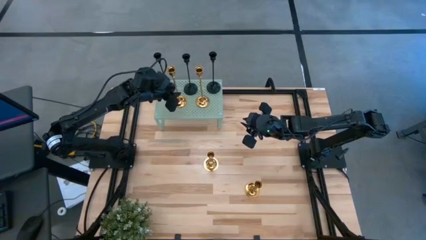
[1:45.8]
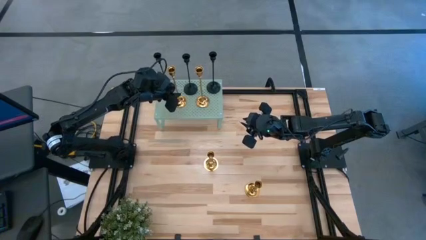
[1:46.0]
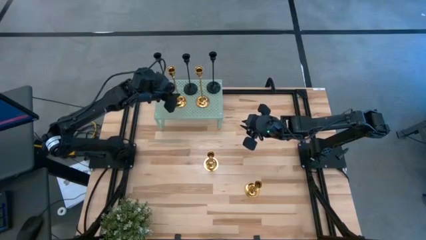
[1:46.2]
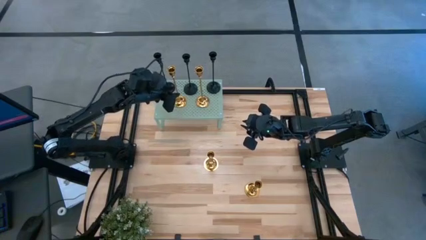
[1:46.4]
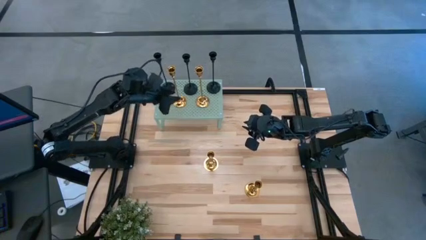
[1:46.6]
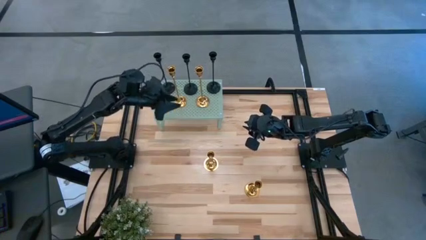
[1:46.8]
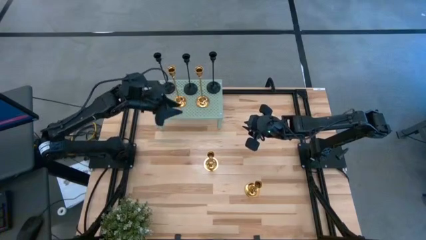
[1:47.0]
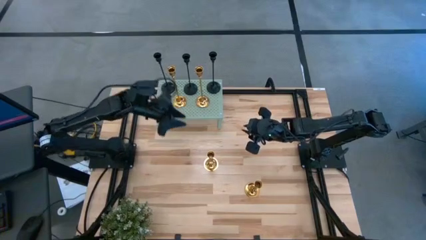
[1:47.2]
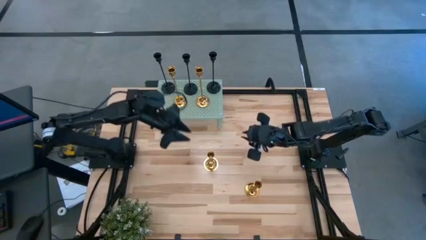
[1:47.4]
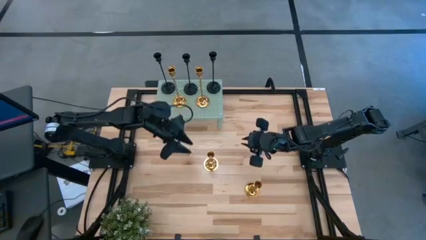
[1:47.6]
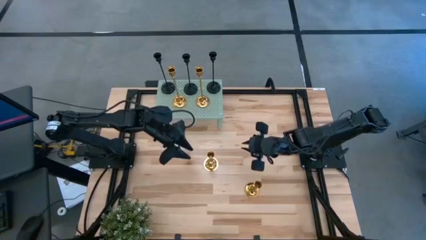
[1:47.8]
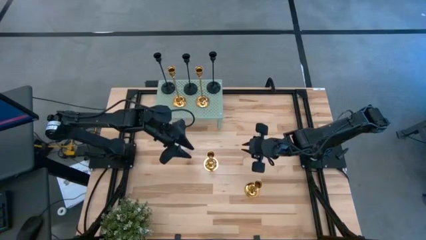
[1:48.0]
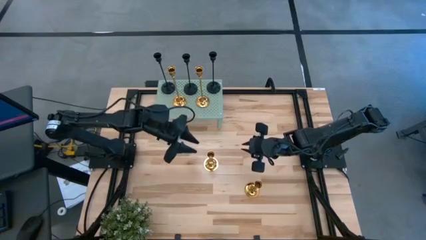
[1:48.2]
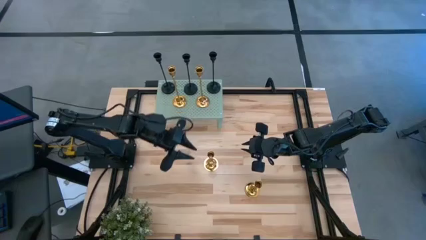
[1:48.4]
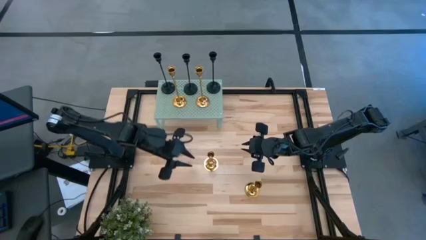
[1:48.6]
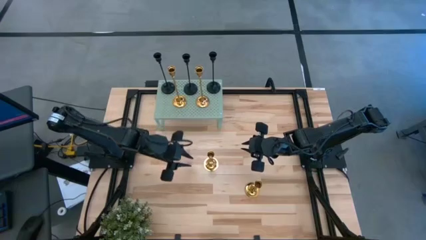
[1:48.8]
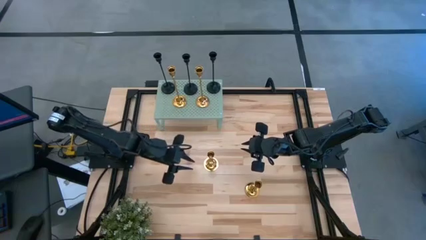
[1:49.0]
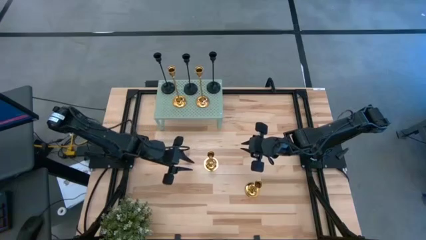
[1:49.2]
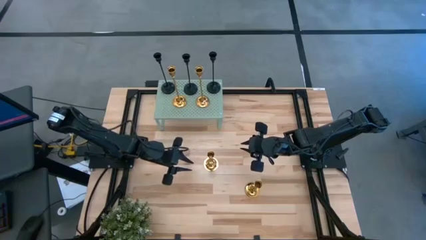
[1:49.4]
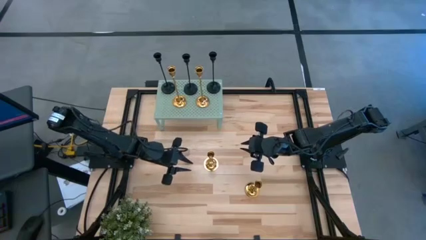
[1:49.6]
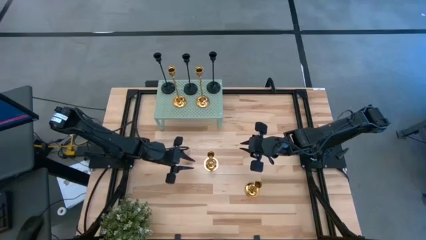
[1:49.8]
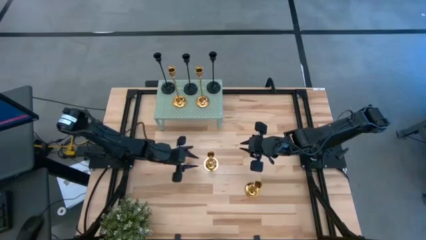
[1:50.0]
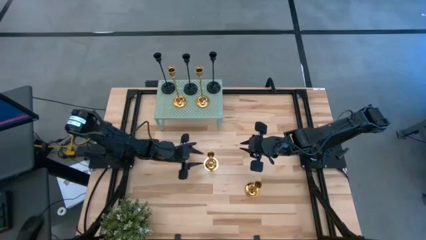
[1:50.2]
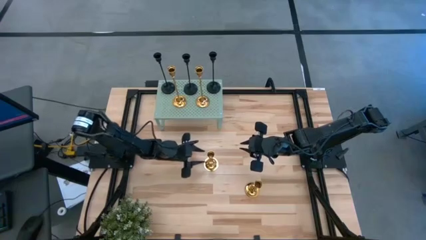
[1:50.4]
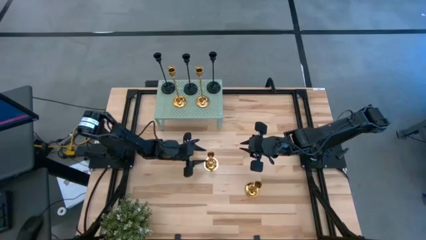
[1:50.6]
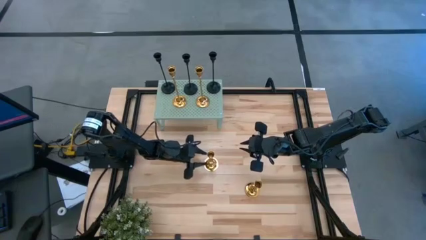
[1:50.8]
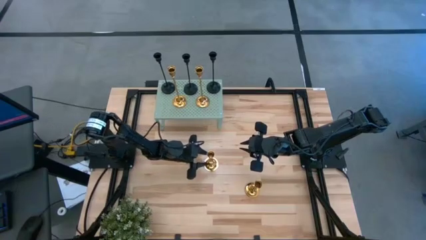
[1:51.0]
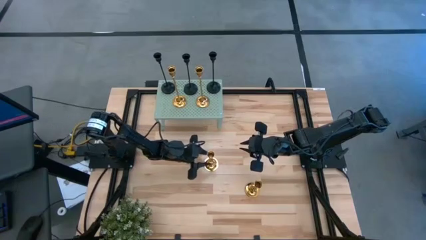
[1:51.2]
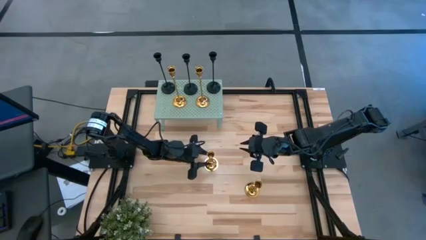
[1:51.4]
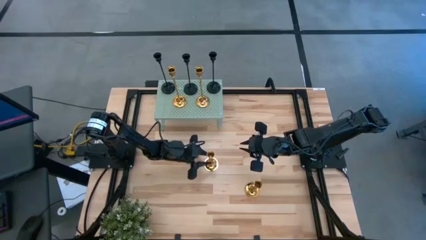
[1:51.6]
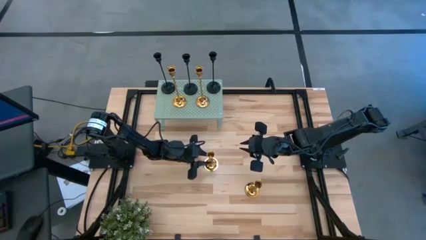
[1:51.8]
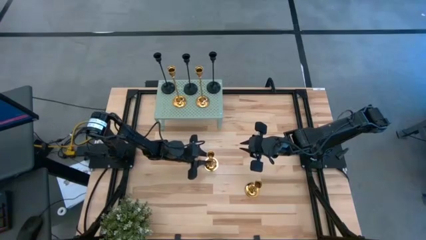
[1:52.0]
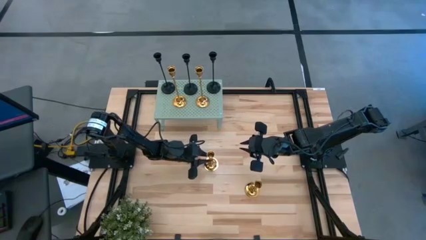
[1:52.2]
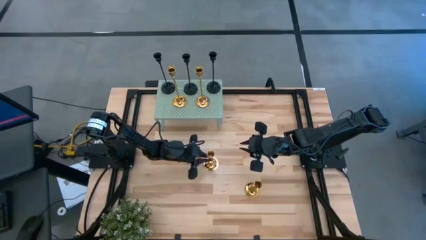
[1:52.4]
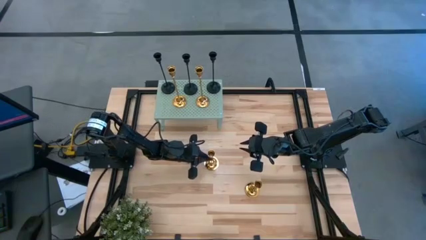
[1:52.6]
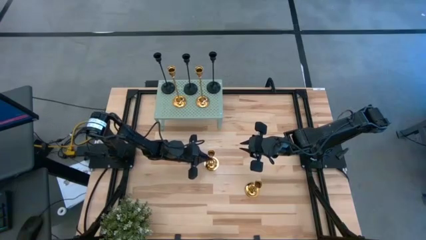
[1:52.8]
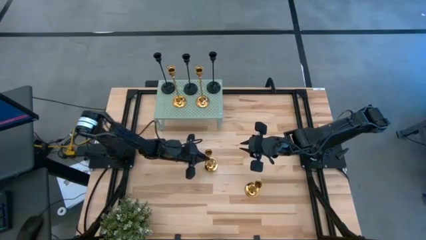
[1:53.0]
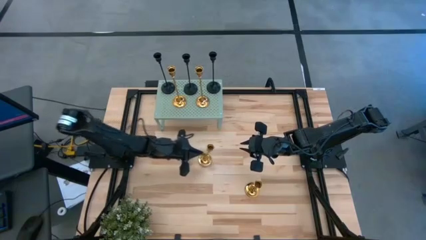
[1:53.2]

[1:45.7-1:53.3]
Task: Pick & Place candle stick holders
Put the gold candle holder on the shelf

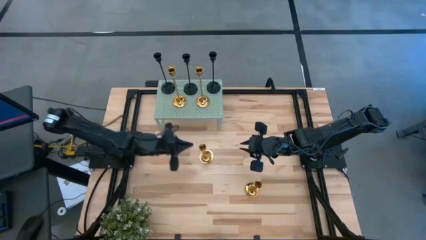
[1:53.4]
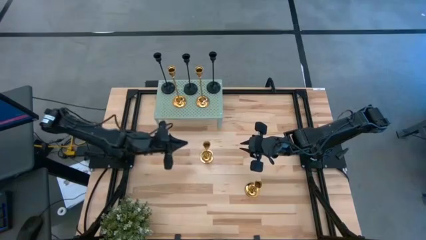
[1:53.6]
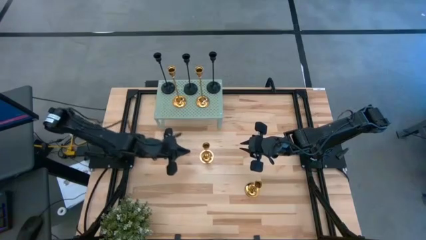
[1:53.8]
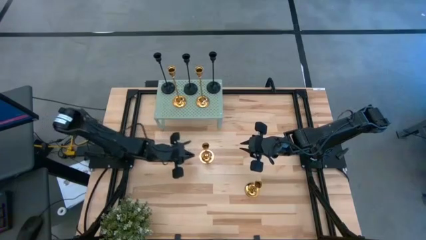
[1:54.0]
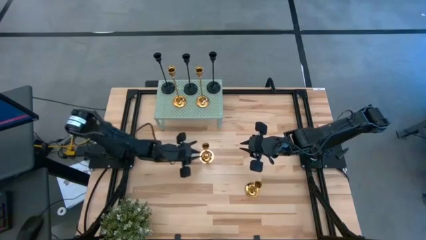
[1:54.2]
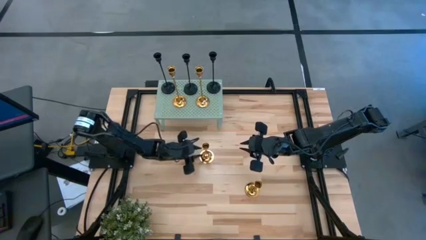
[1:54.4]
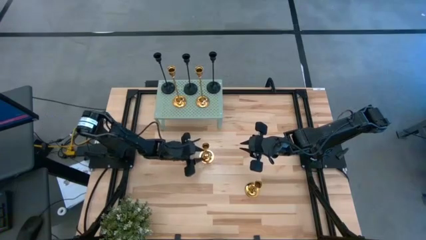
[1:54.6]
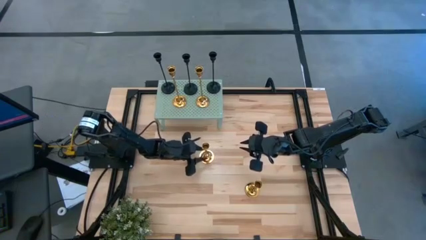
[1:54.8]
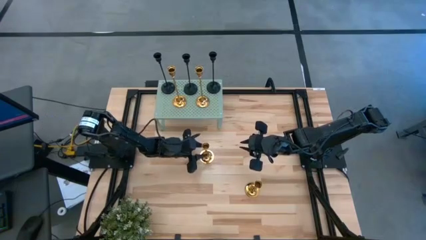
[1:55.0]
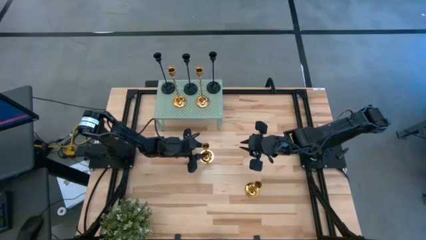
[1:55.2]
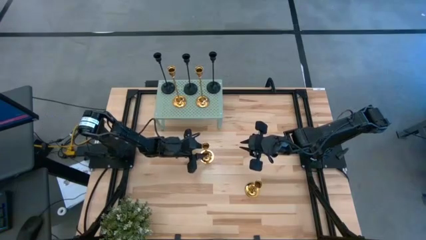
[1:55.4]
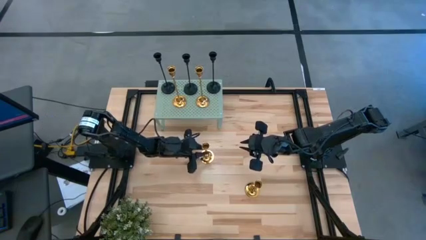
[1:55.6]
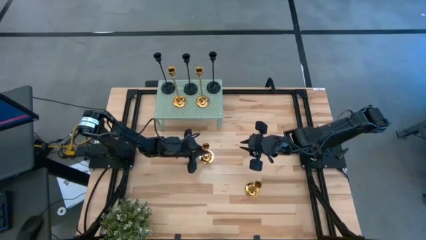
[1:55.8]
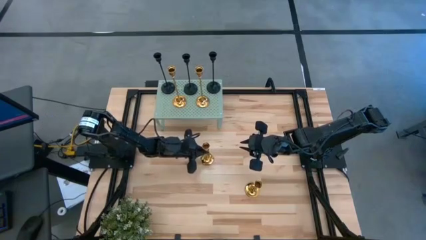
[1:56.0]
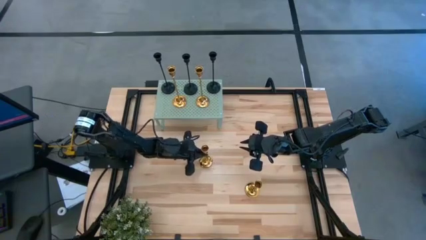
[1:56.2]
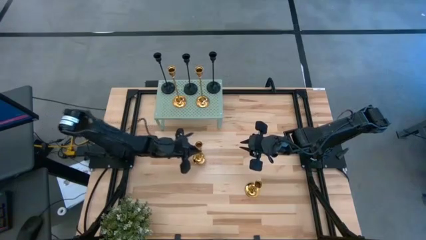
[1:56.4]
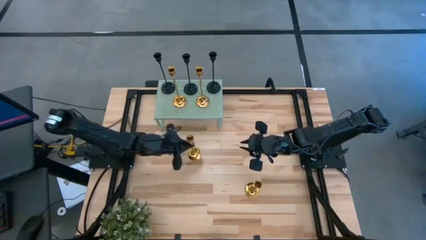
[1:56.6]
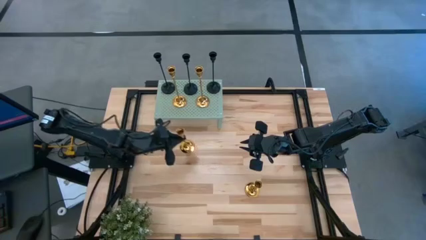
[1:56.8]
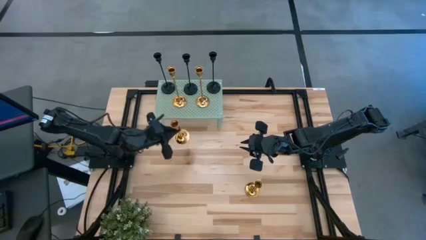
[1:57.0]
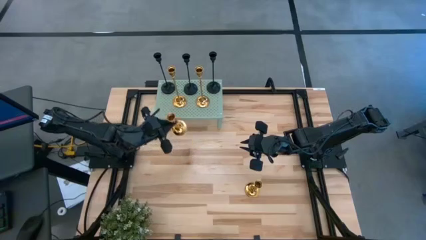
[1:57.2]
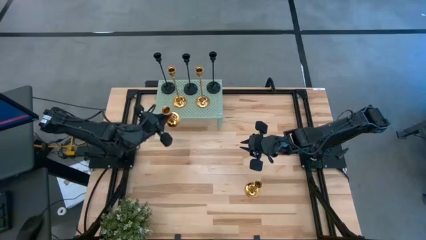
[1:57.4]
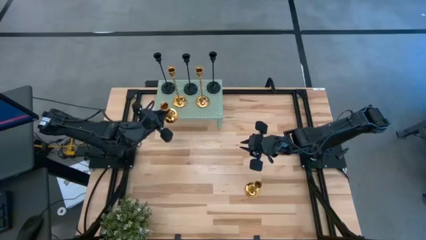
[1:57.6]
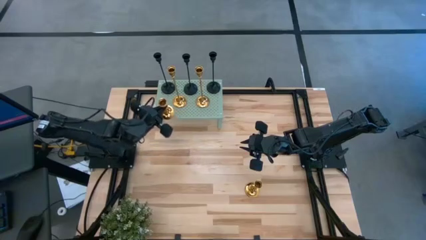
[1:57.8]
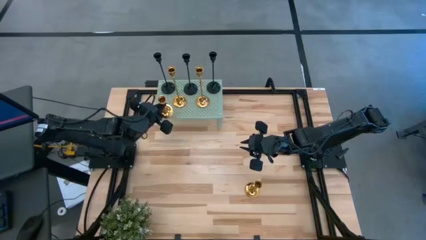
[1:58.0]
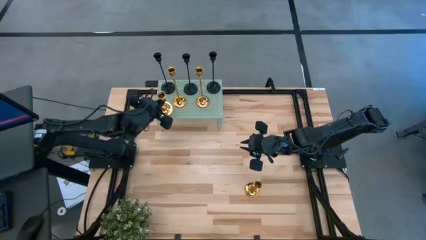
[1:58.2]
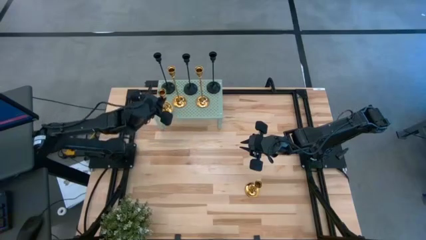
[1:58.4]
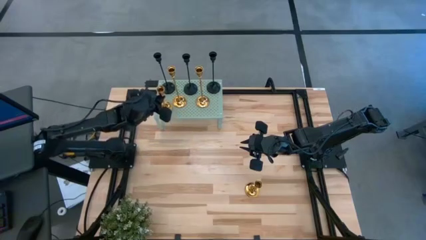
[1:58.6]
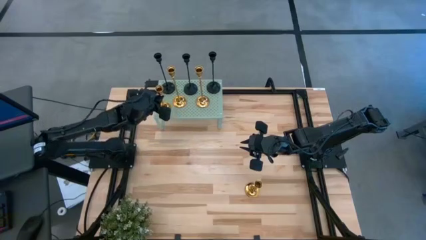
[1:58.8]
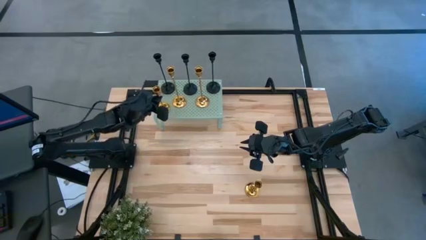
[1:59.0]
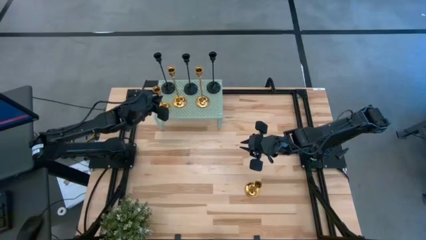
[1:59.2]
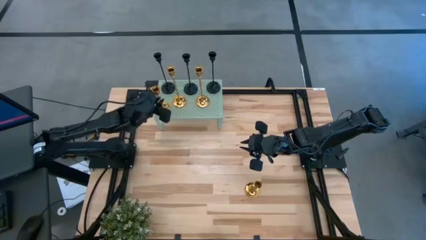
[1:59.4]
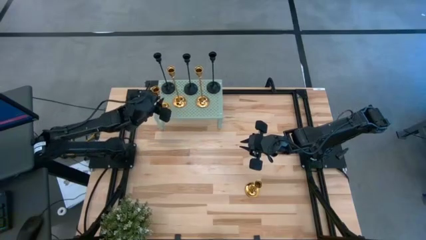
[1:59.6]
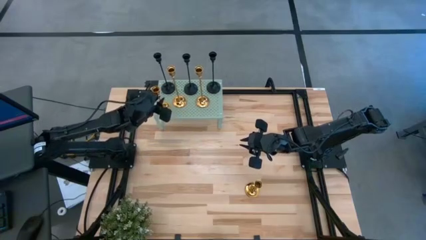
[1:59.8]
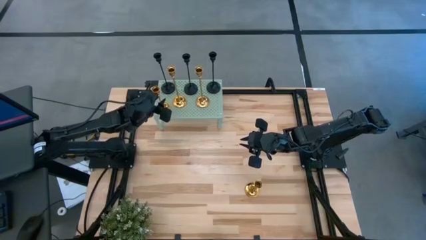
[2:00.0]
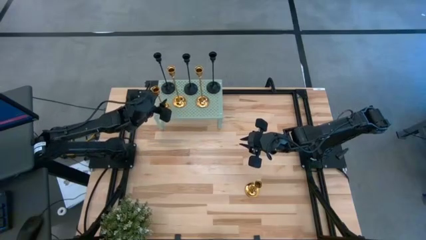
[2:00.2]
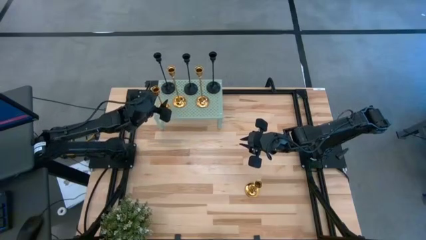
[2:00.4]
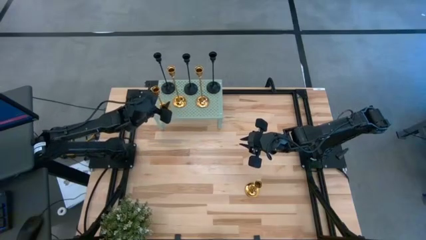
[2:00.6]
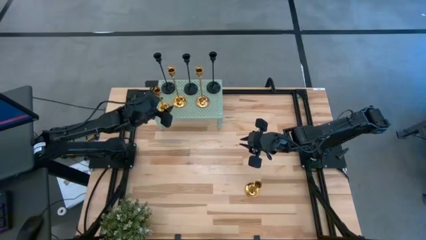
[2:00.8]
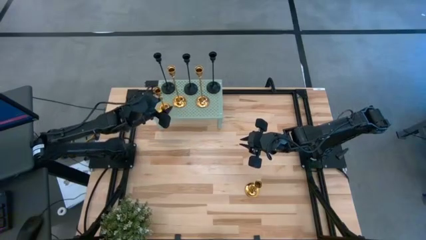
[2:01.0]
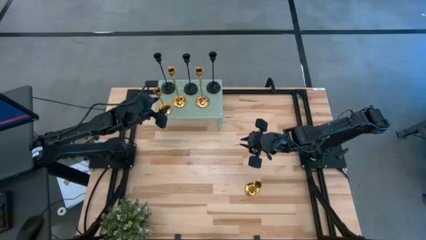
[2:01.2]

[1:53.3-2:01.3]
Put the gold candle holder on the shelf
